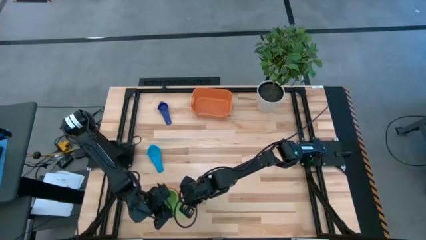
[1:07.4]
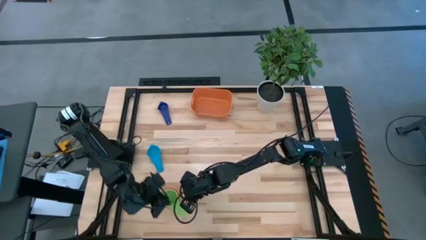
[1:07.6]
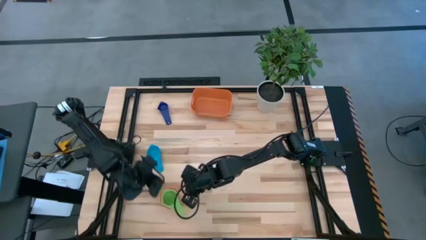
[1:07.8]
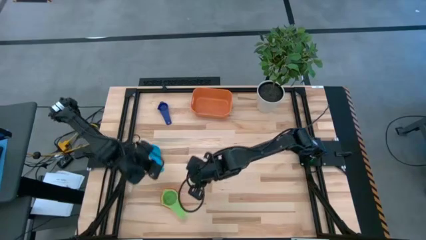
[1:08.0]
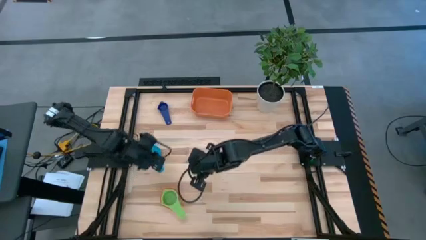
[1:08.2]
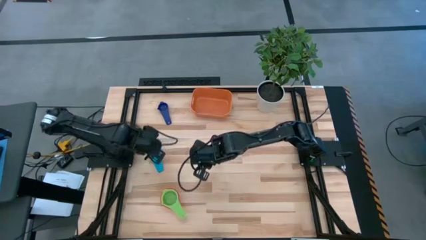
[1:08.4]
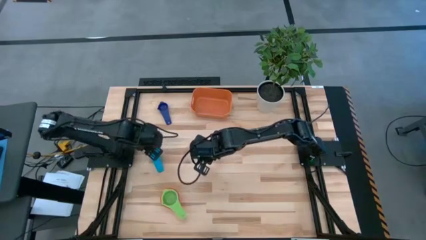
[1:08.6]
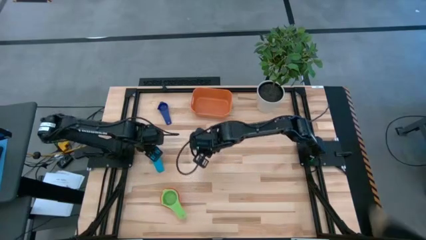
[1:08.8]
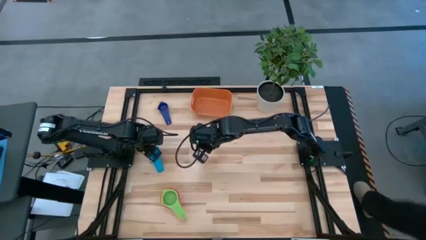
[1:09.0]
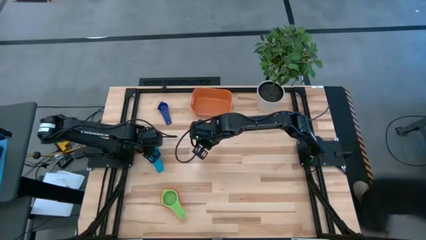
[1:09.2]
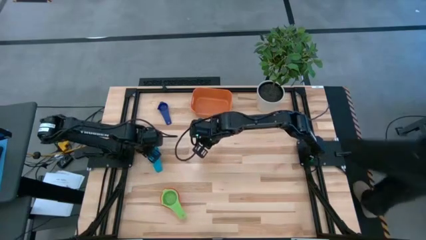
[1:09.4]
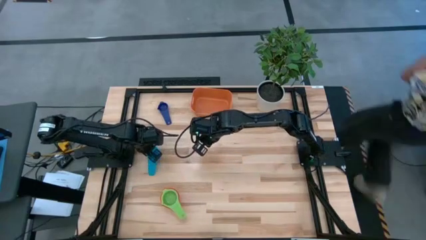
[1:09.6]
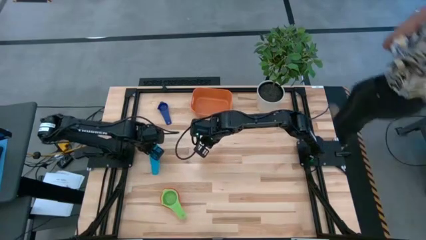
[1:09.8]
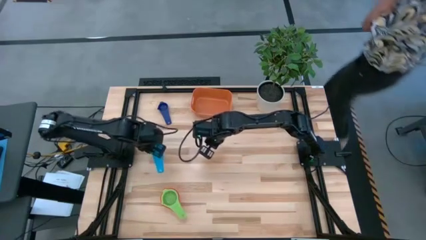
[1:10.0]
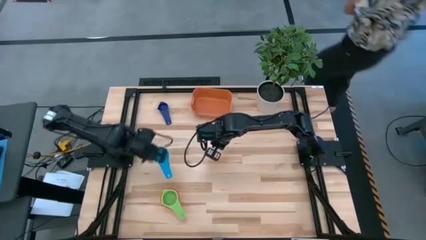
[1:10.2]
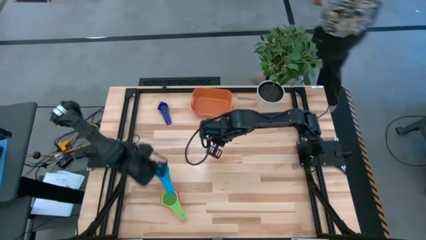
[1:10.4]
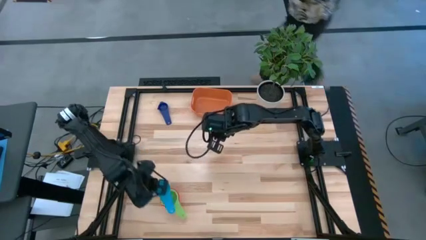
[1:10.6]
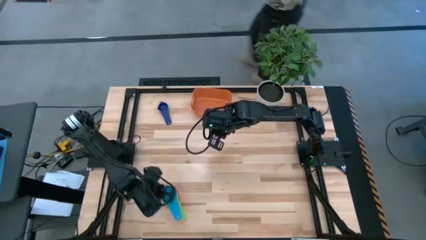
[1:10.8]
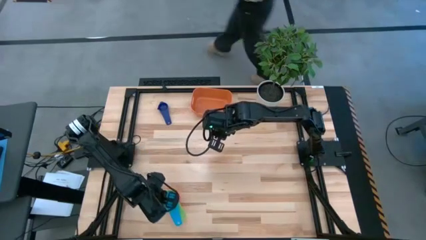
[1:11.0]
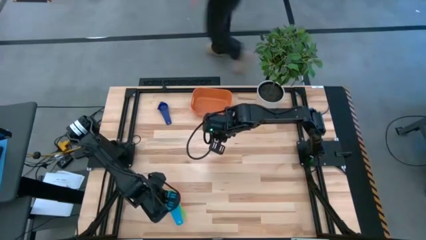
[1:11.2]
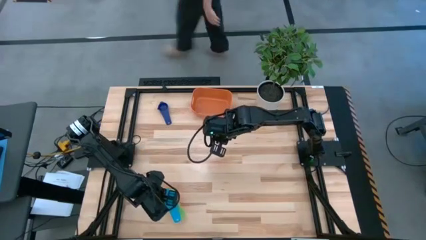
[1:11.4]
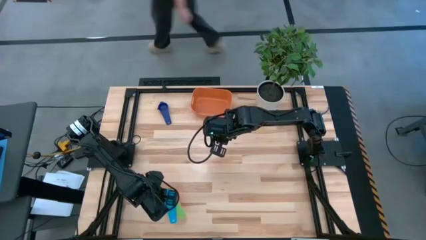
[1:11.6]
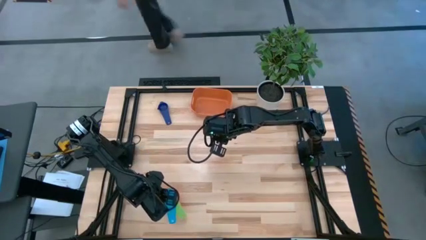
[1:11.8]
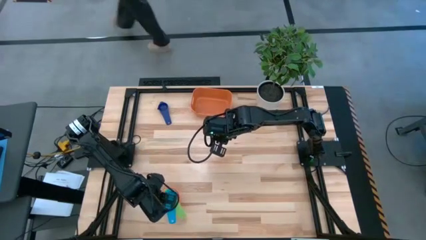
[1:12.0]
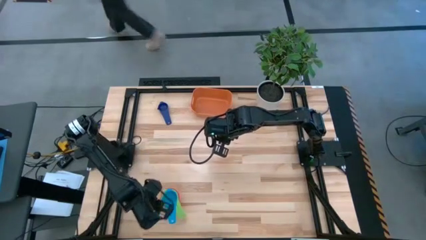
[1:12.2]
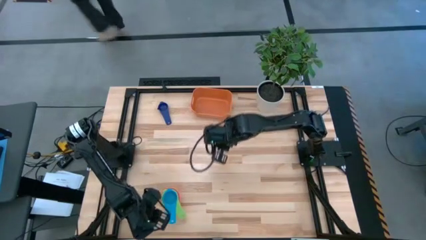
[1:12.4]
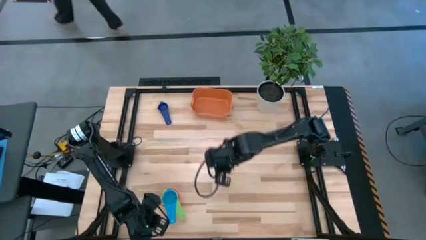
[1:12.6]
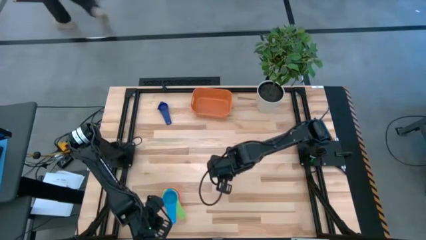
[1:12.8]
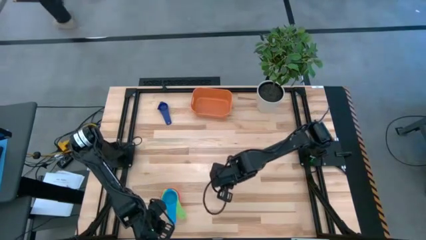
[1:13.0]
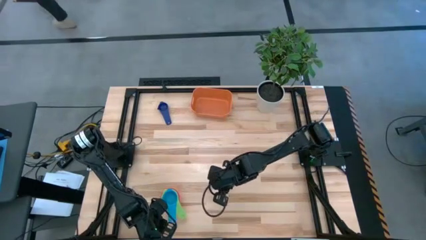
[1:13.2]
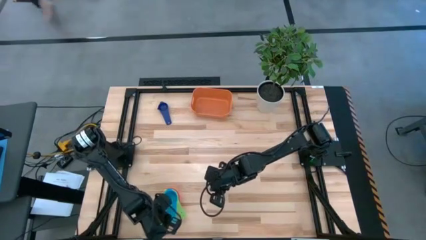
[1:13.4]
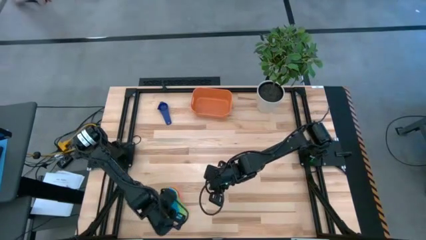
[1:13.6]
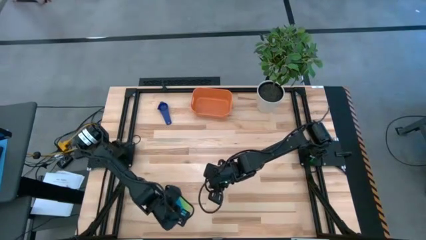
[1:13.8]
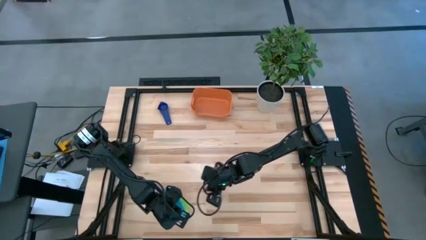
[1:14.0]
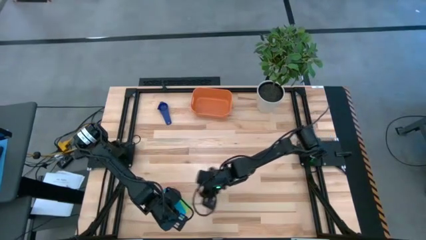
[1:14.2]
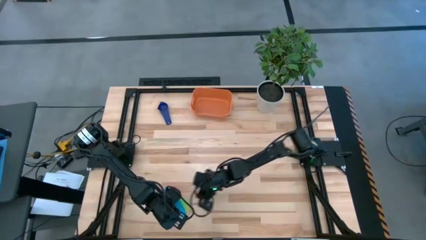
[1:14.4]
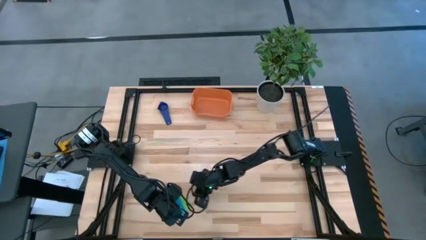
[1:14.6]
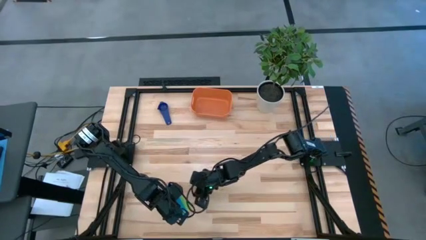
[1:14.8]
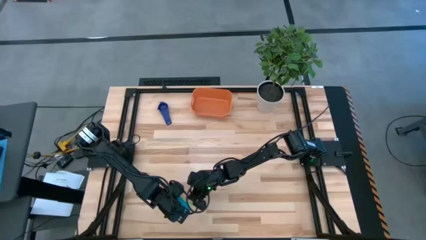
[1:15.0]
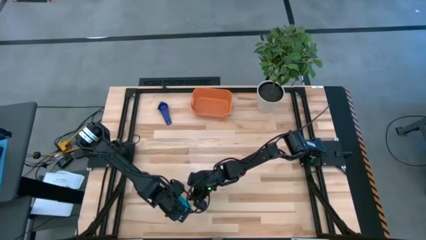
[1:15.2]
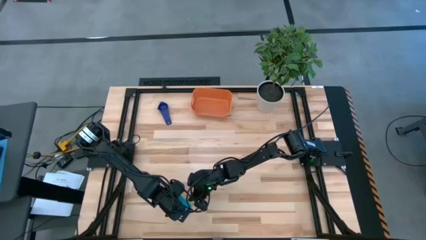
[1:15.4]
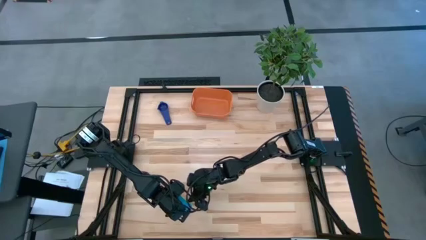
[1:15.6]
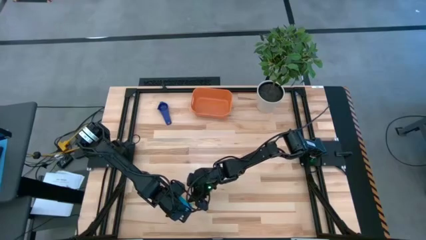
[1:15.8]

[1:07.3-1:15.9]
Task: Nest measuring cups in basket
Stack the light blue measuring cup on top of the green measuring cup

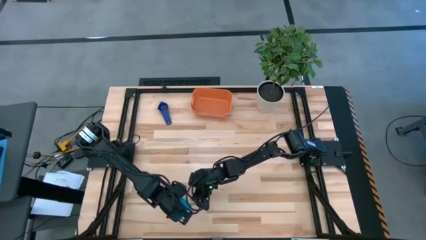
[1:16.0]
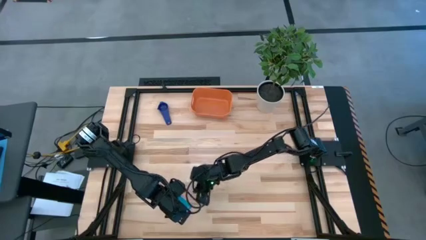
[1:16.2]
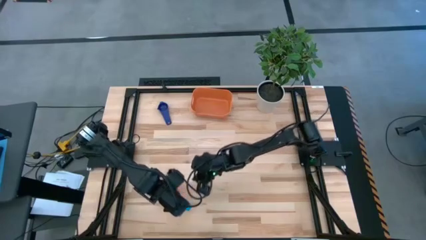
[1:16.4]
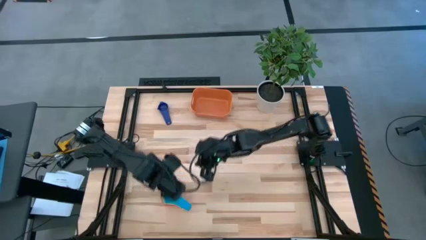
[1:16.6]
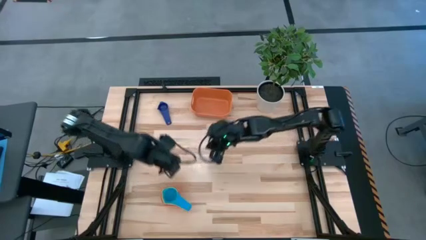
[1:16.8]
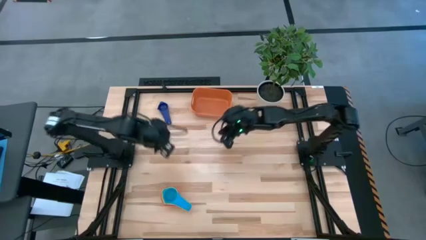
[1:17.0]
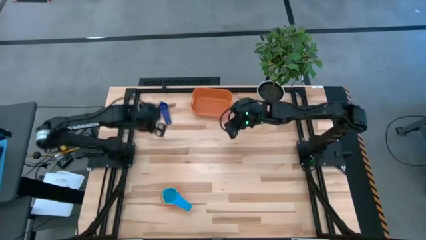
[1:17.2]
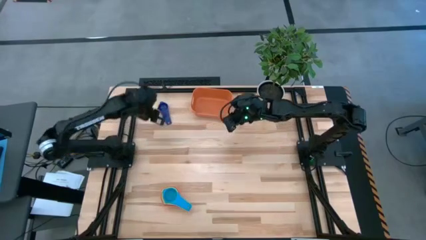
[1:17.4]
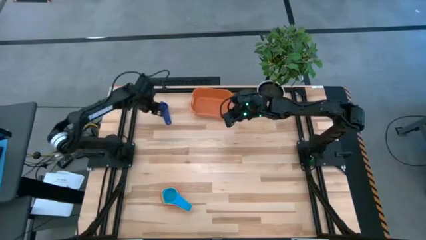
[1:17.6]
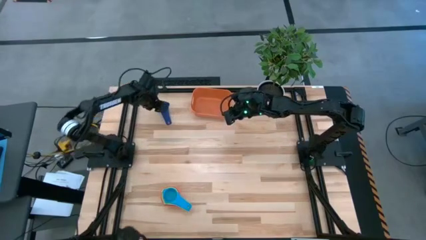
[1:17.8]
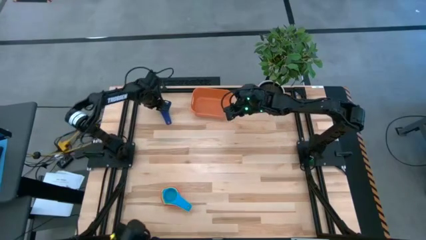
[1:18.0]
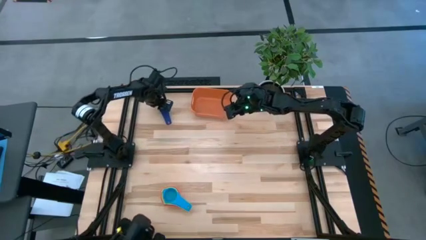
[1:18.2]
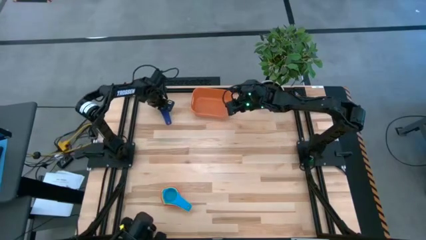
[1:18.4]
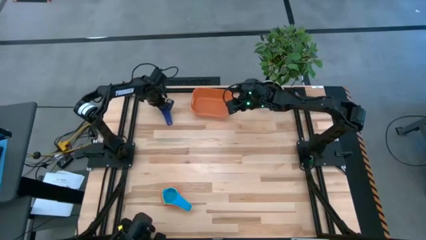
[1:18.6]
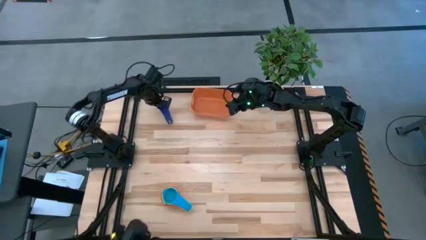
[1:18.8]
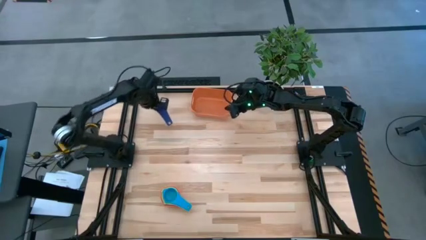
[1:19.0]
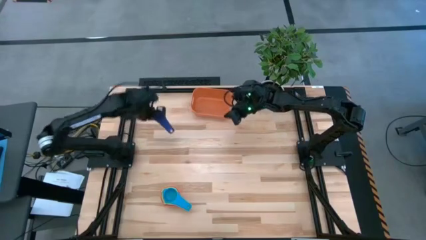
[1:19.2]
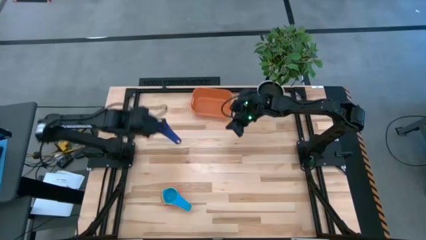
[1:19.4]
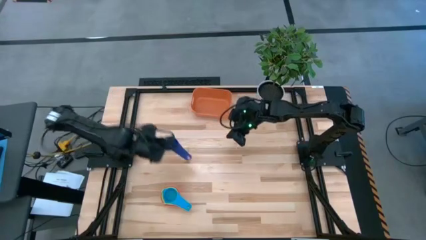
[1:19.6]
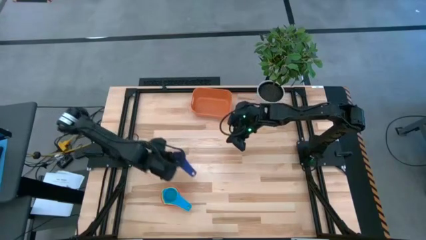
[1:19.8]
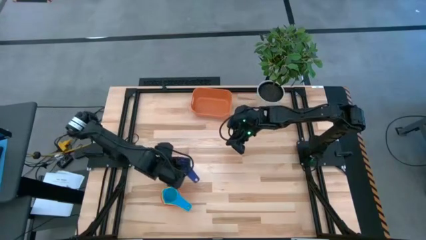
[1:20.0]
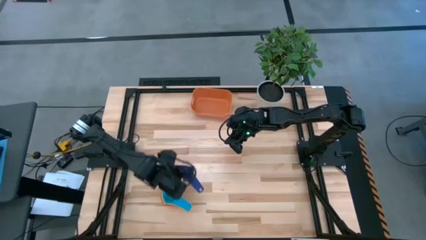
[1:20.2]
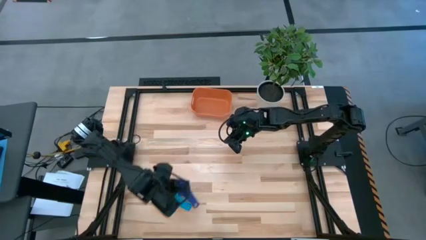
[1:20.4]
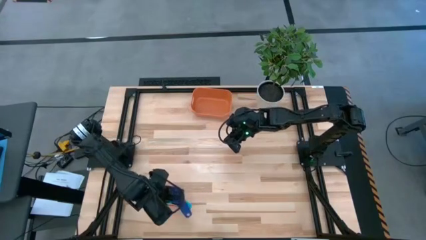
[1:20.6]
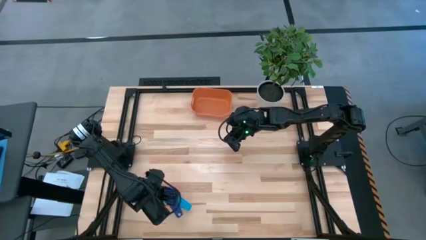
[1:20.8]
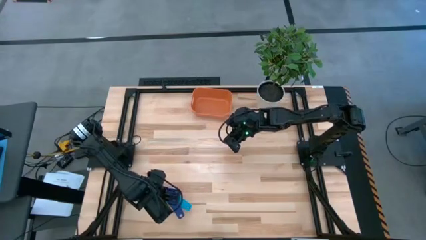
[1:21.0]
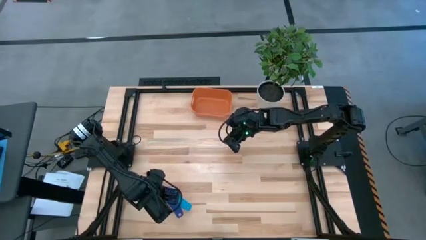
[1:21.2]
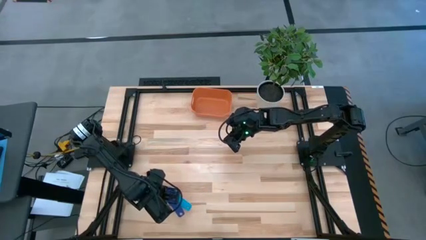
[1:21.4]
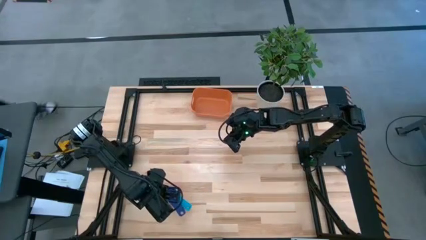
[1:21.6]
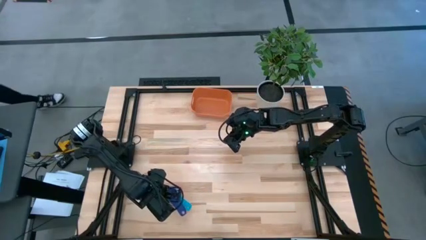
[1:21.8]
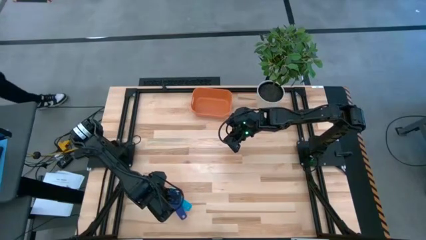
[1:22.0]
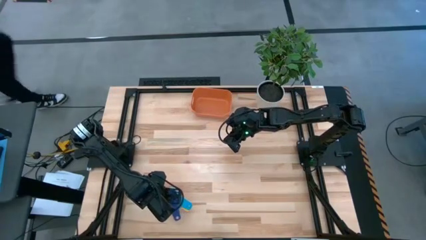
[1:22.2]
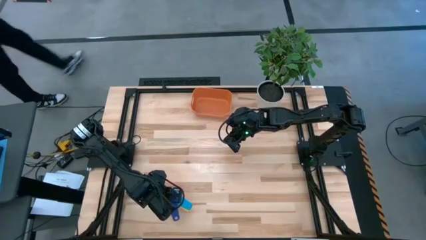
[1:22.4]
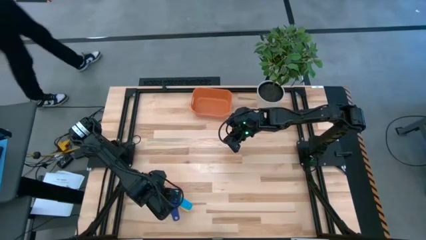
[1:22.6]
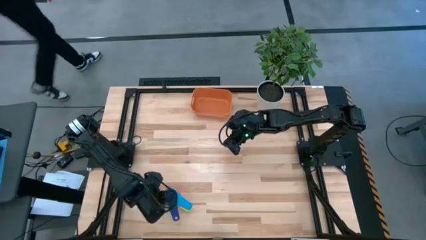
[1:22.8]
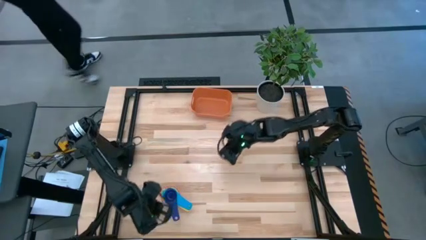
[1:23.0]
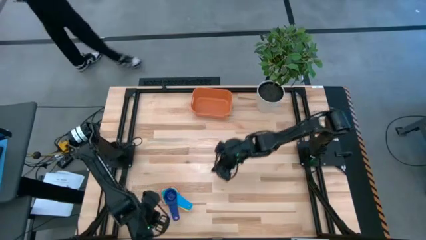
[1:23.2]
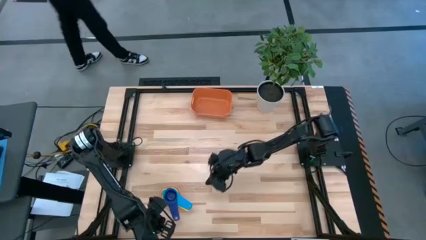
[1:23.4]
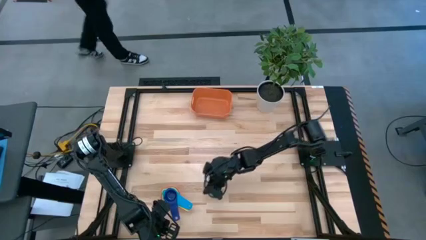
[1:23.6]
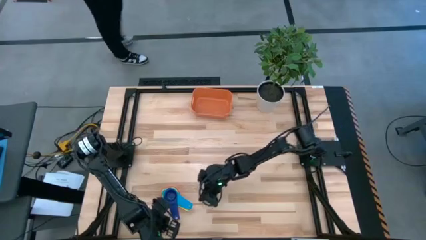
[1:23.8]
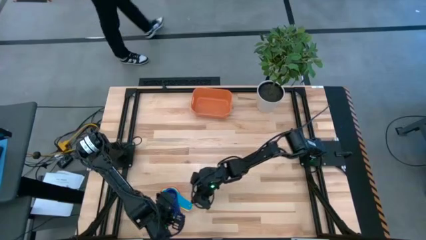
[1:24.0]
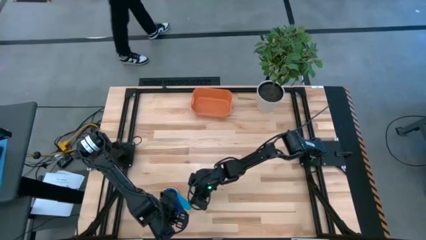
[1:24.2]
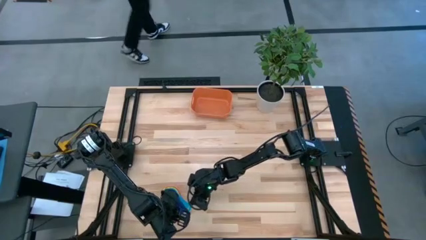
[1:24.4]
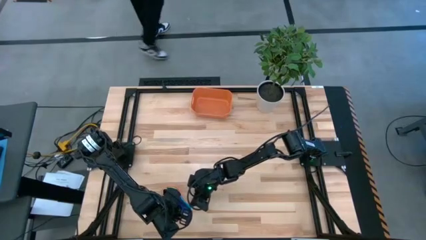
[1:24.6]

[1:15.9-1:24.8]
Stack the violet measuring cup on top of the light blue measuring cup
